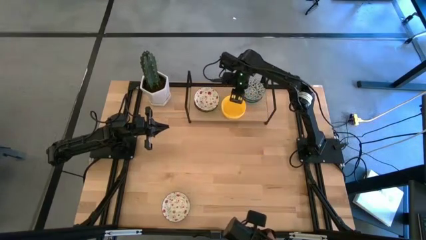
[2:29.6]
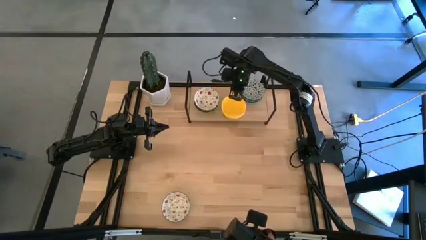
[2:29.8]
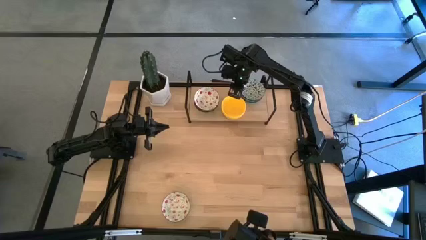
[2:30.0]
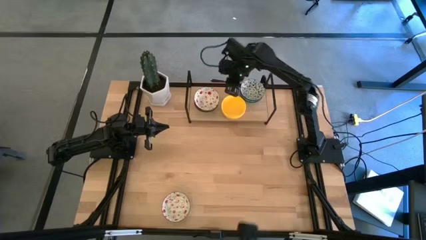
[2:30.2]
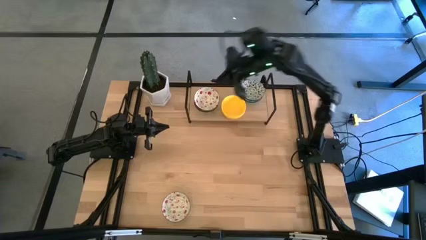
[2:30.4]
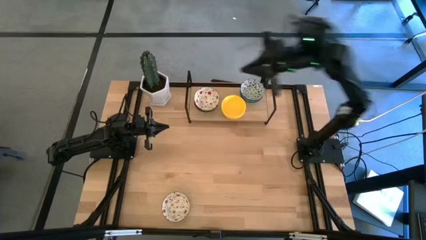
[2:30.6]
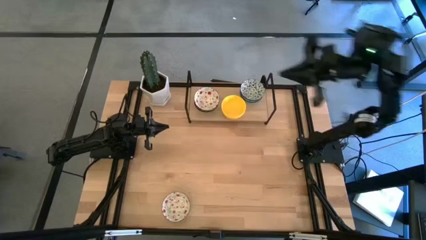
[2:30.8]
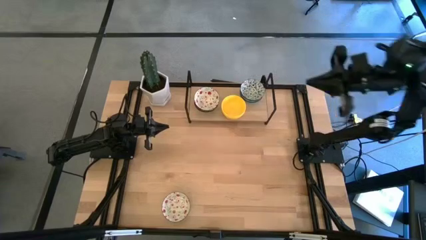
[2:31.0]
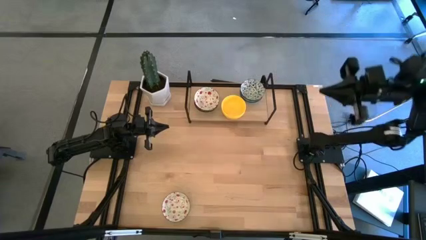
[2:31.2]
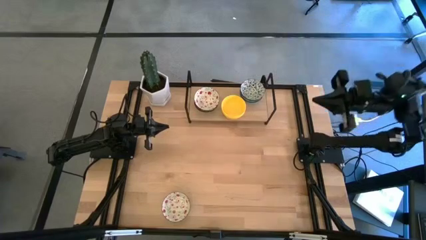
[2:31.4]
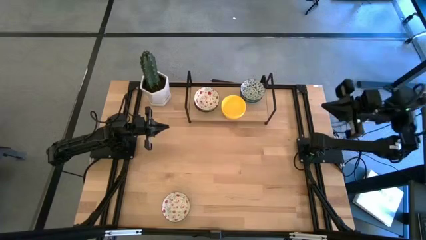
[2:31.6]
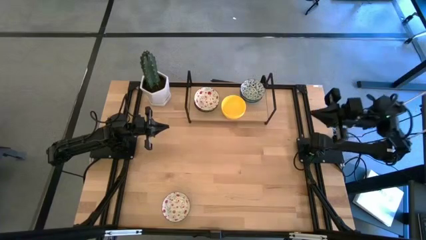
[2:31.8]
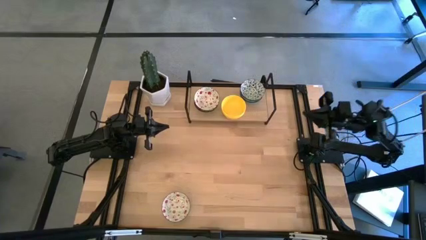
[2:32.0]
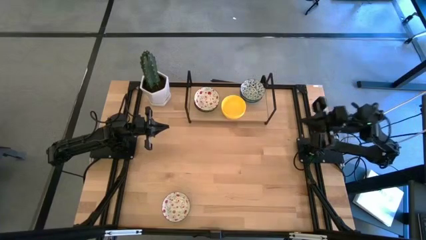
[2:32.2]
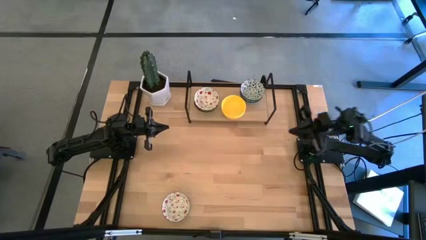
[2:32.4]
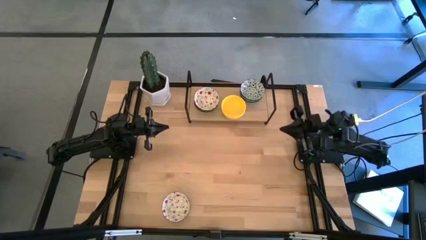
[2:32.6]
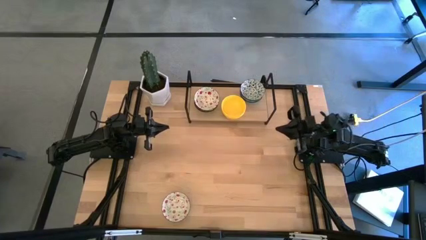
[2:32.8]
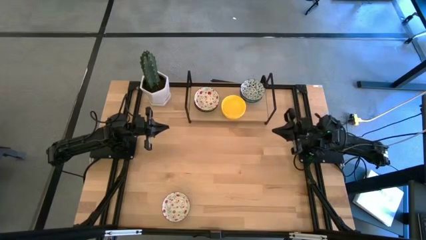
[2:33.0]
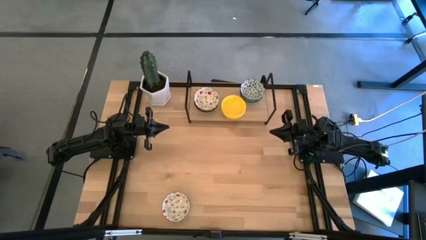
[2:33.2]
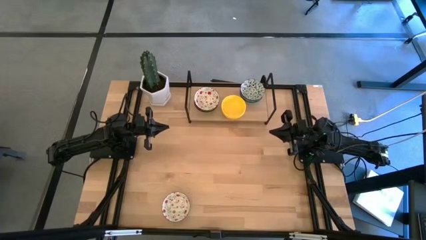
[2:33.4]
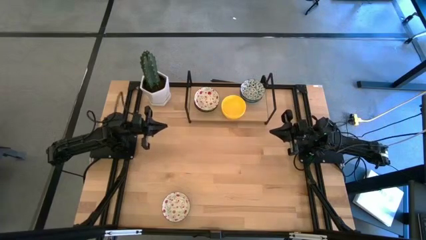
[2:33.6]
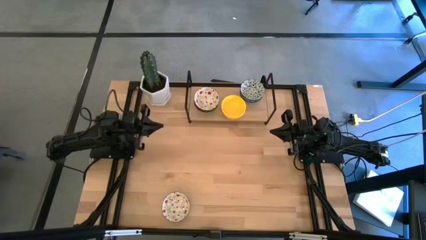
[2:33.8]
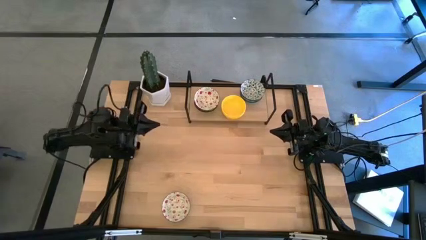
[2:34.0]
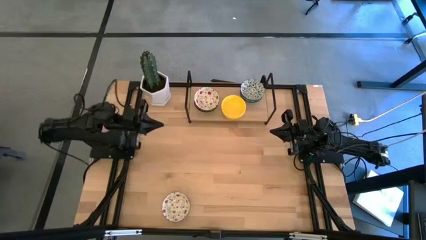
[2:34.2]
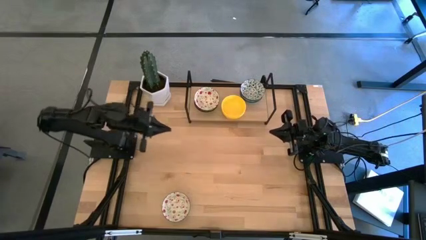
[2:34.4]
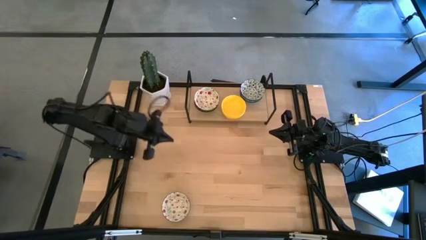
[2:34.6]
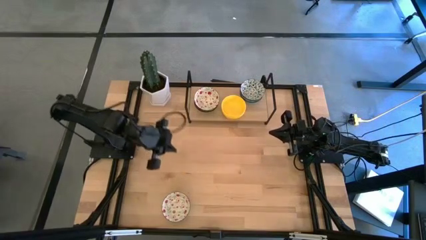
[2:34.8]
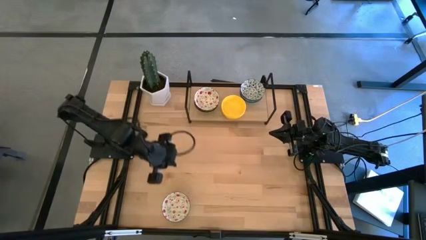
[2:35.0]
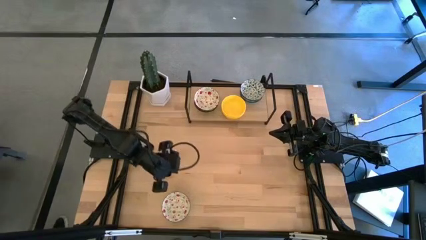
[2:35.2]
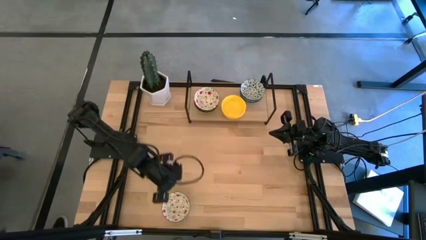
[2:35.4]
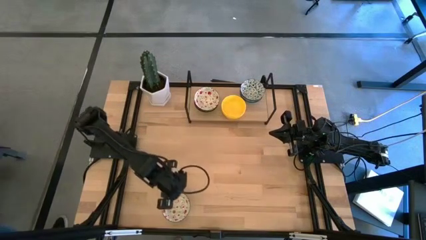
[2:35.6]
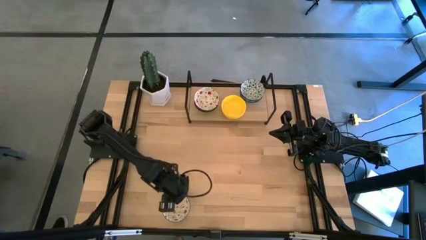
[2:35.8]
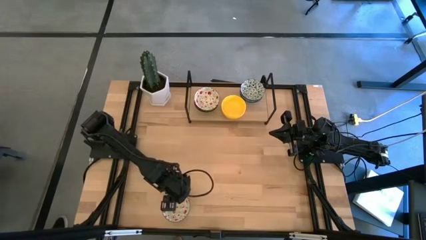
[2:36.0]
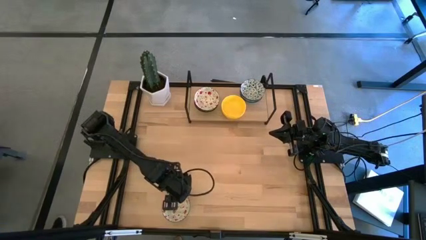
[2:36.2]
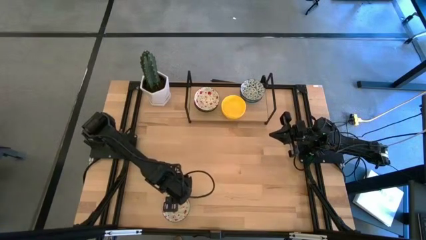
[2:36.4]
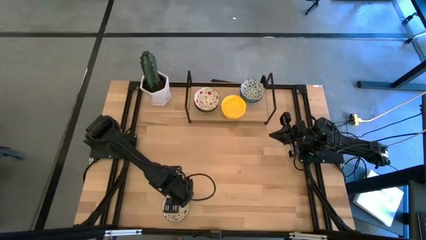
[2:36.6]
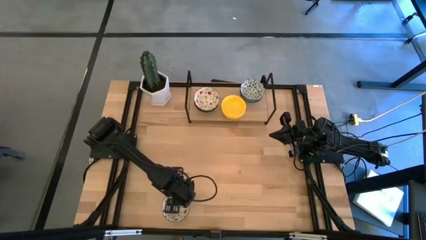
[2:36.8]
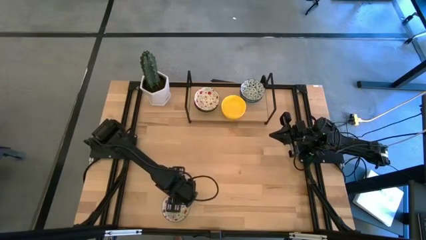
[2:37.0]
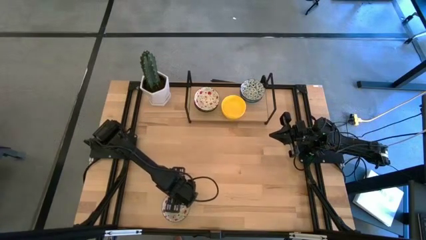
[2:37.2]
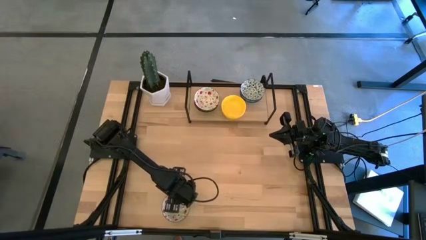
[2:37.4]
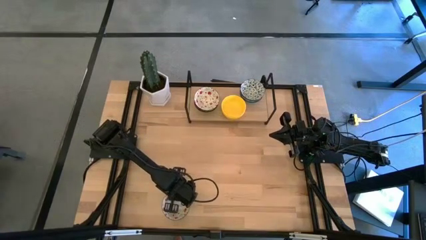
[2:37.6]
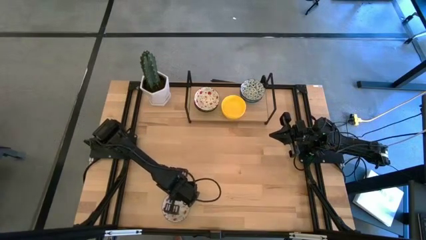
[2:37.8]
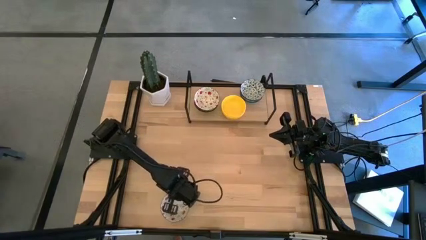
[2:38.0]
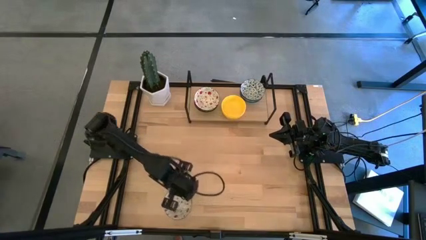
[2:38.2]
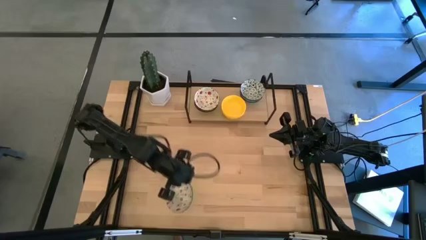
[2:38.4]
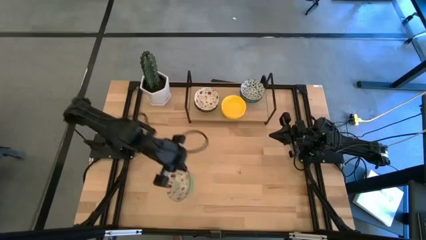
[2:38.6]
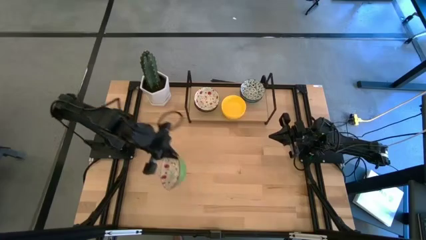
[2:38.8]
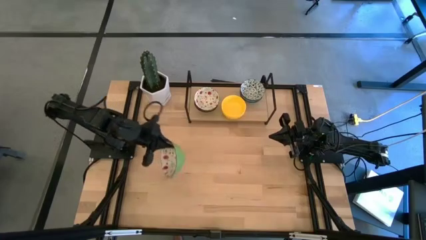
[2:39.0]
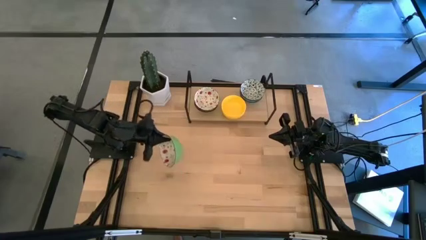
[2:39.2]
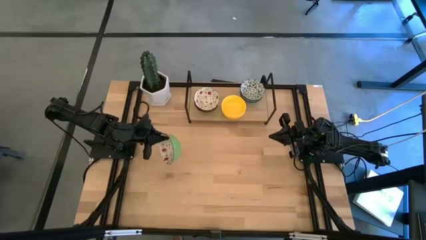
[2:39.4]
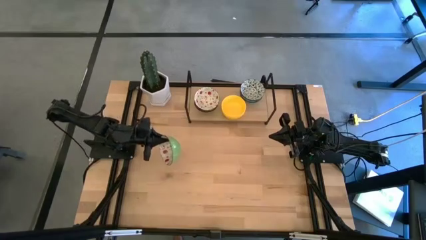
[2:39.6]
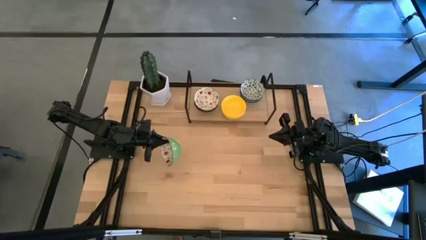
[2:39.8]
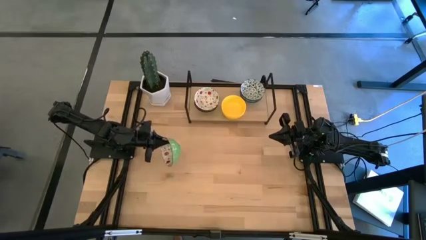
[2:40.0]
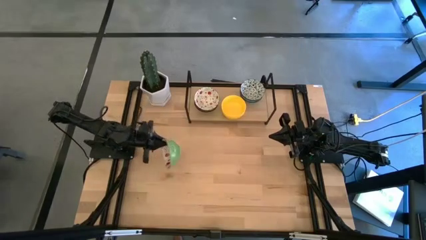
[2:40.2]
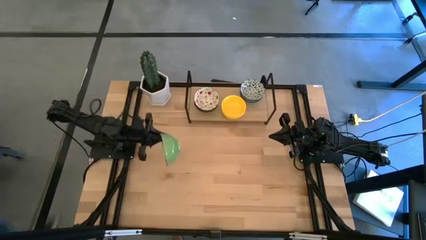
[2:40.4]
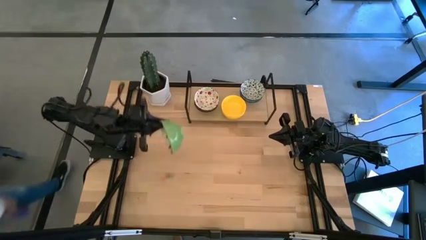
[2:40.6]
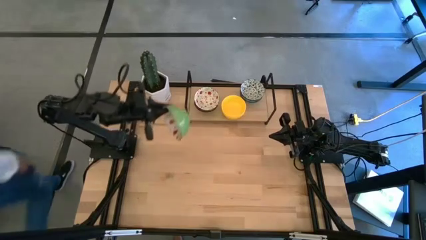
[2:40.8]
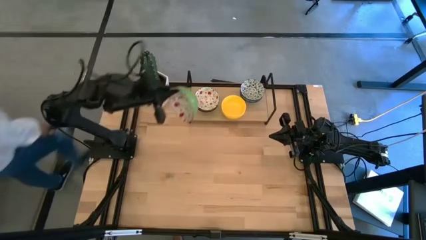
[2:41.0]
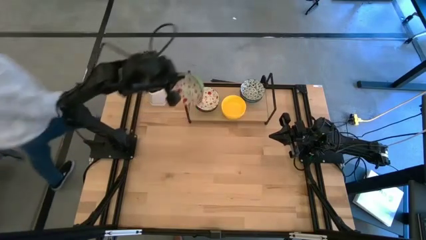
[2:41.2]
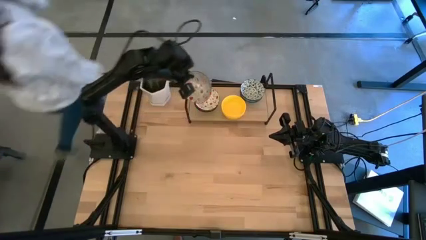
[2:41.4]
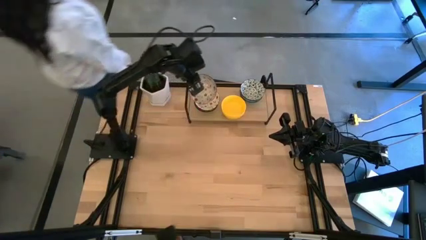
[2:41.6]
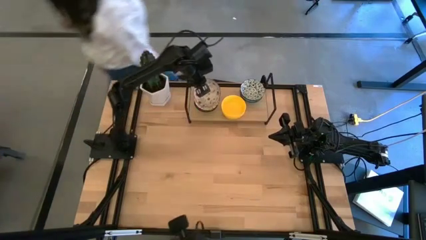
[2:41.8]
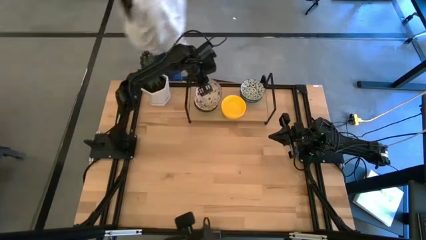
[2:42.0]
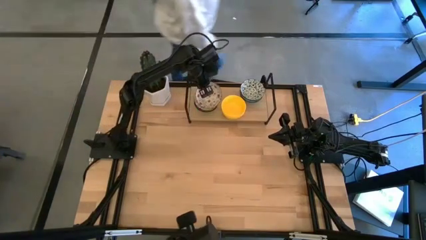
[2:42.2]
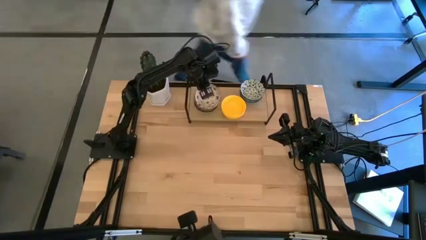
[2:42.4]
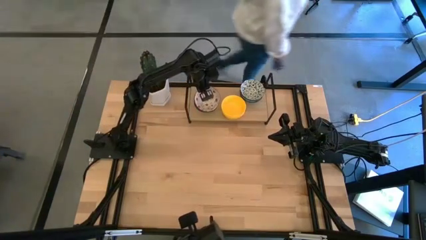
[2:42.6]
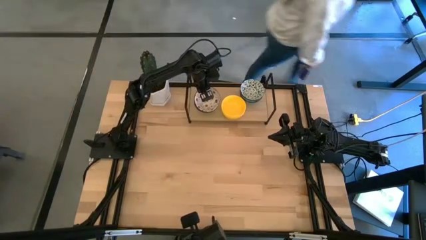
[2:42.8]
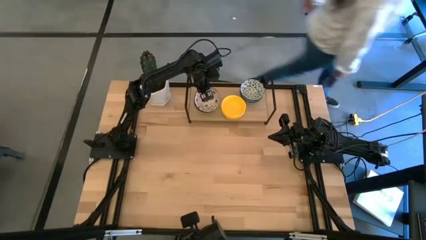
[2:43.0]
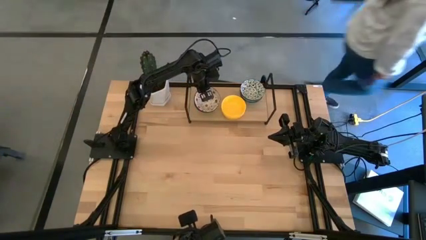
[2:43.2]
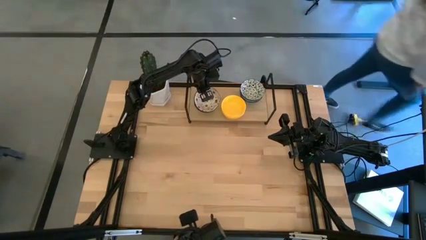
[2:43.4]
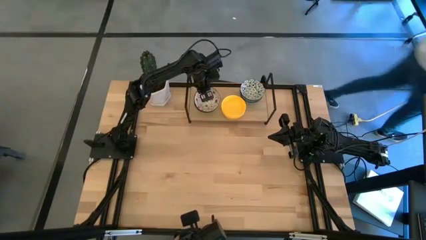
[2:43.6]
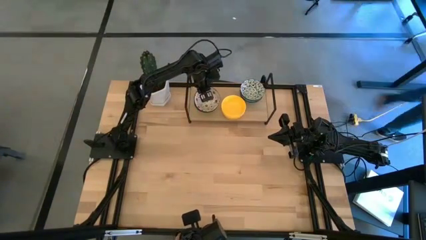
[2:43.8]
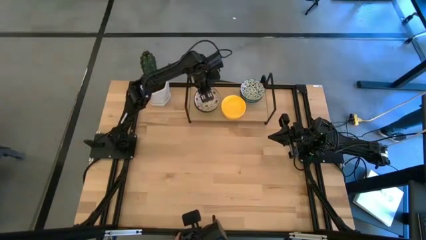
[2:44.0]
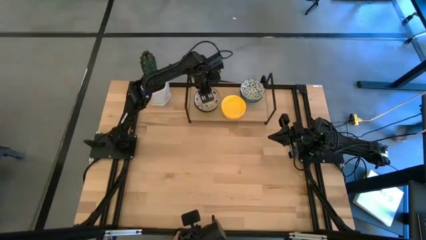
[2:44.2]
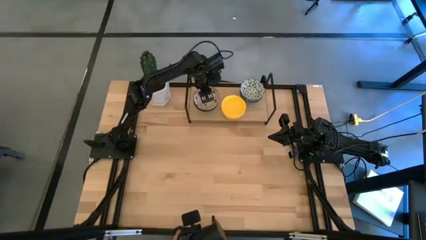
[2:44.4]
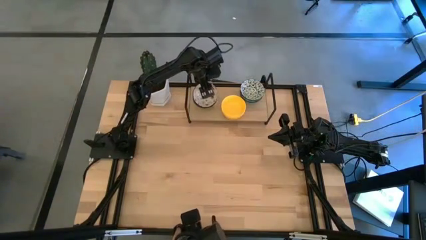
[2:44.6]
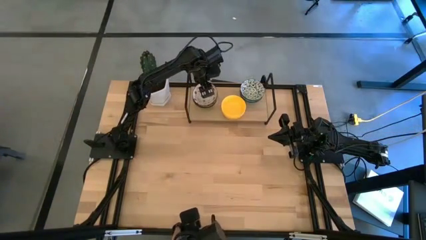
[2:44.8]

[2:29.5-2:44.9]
Task: Pick & Place Mini bowls
Stack the red green bowl on top of the red green bowl on the shelf
